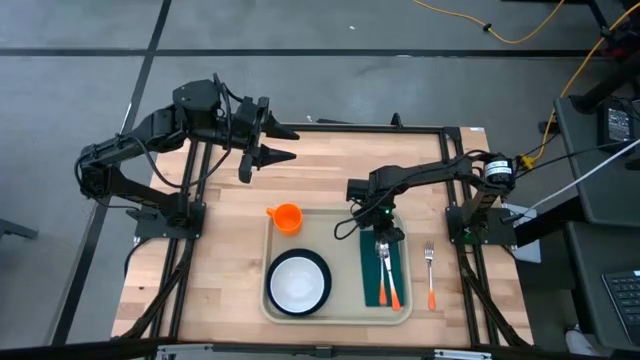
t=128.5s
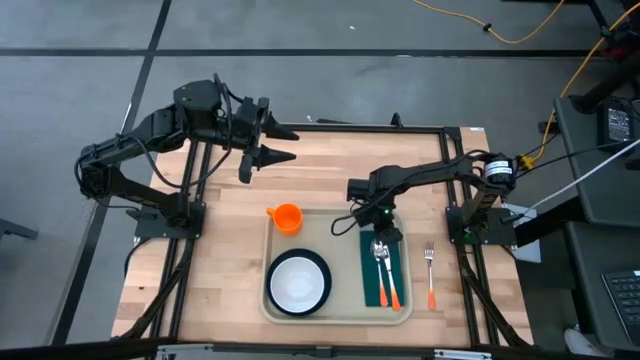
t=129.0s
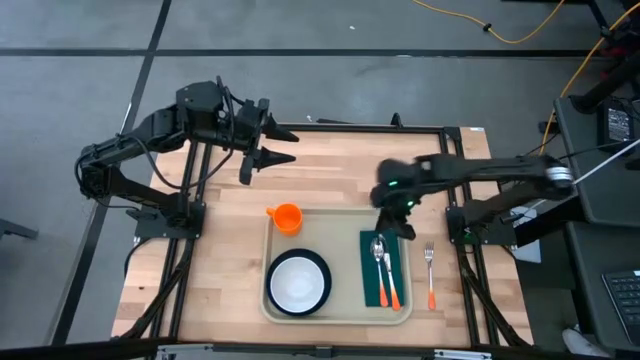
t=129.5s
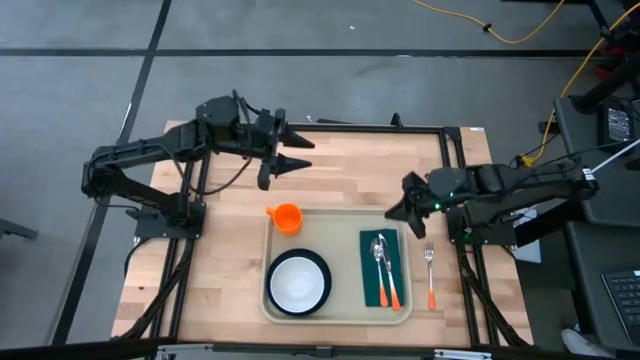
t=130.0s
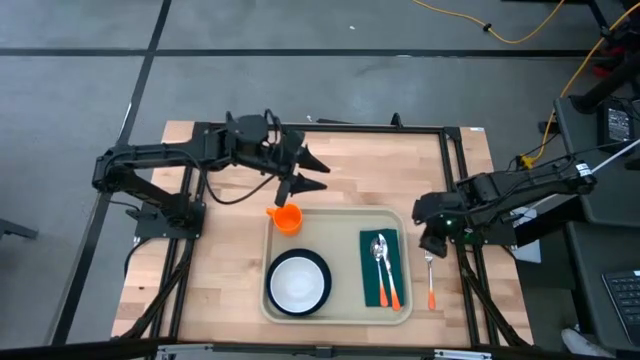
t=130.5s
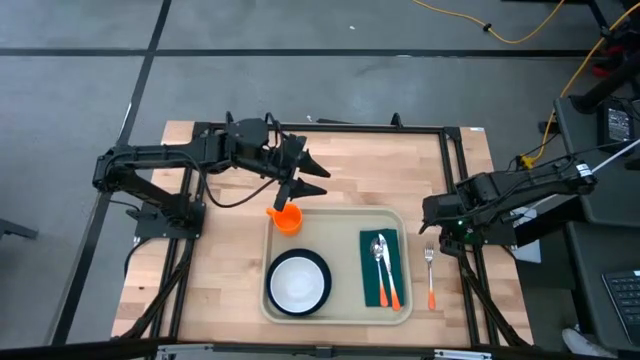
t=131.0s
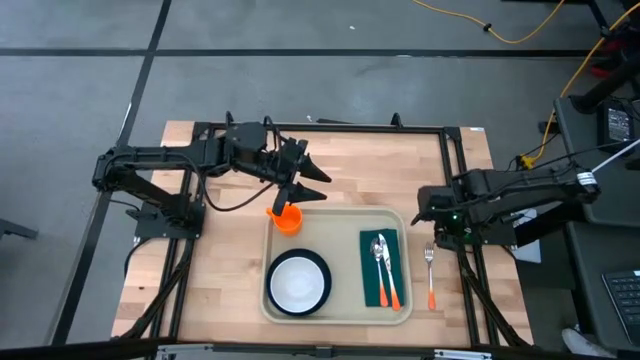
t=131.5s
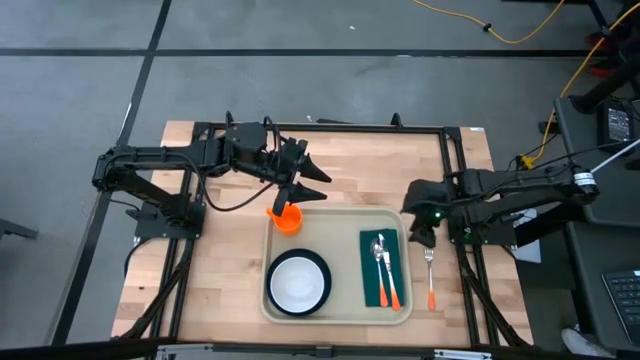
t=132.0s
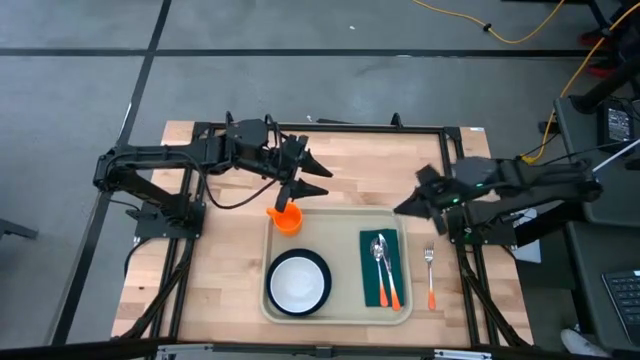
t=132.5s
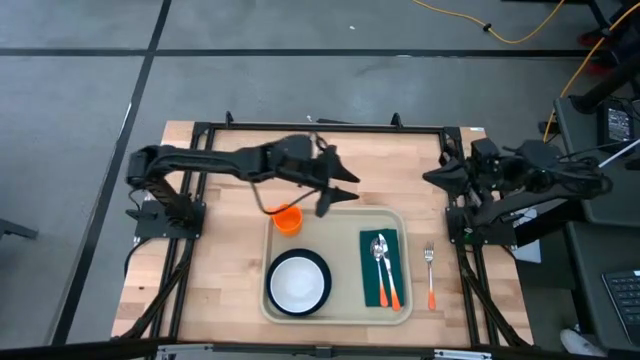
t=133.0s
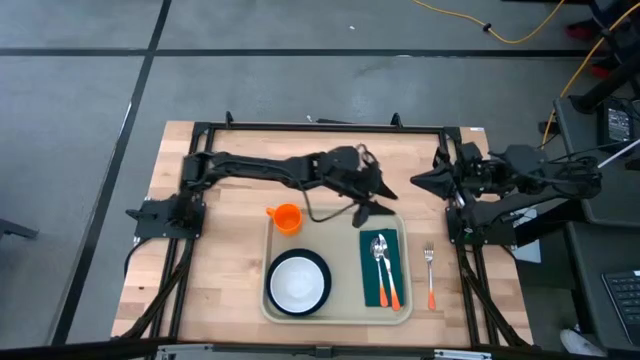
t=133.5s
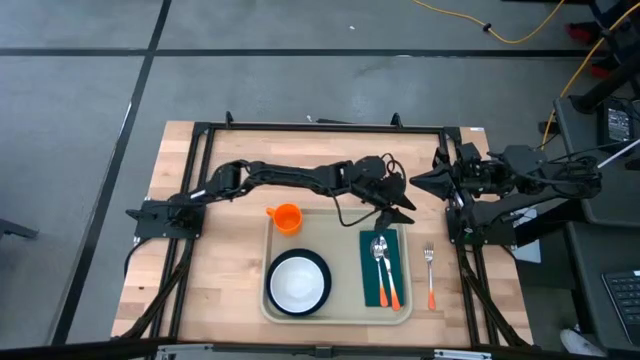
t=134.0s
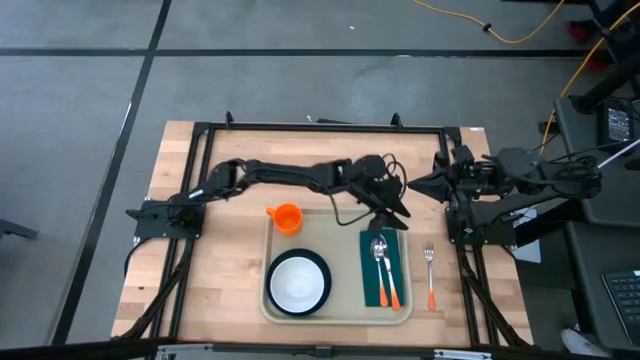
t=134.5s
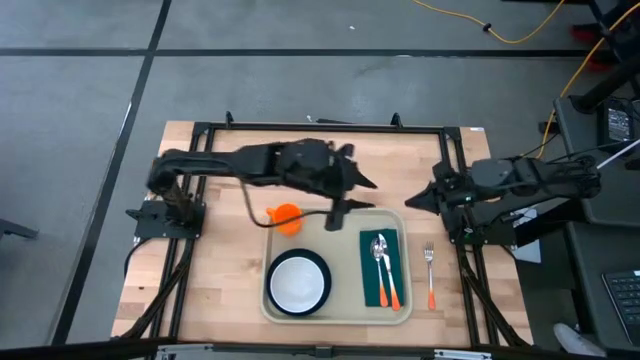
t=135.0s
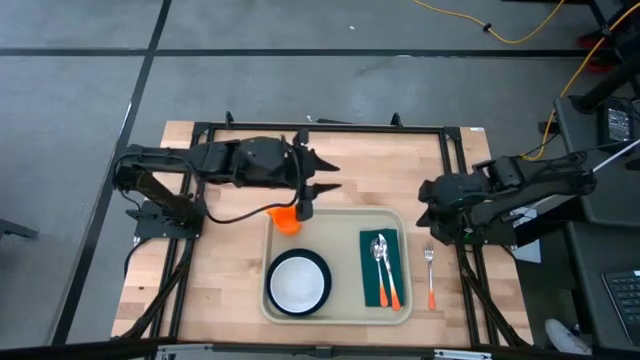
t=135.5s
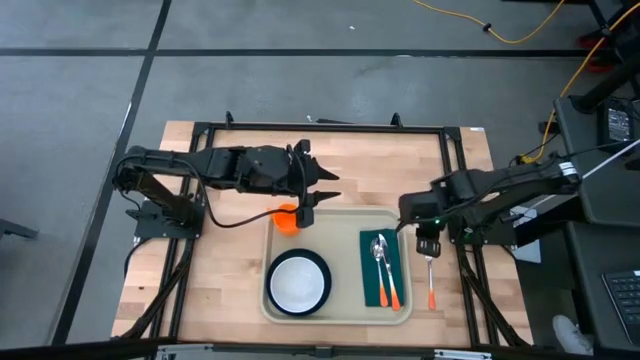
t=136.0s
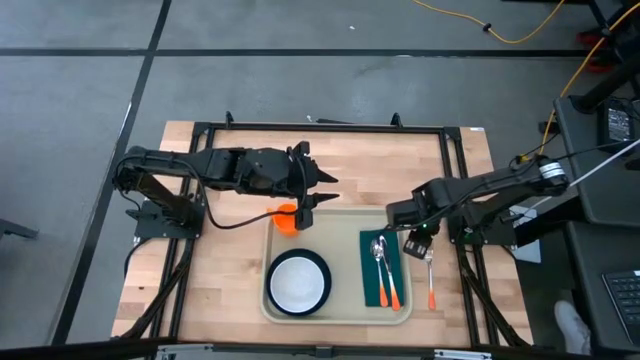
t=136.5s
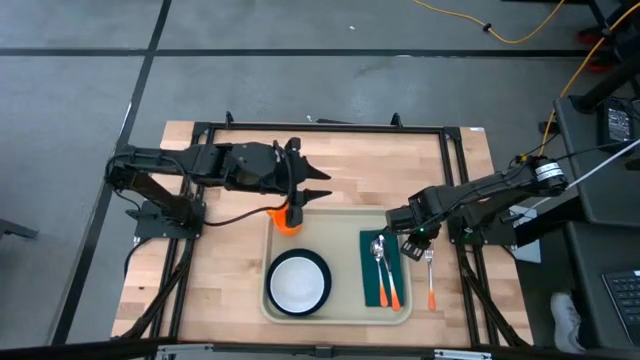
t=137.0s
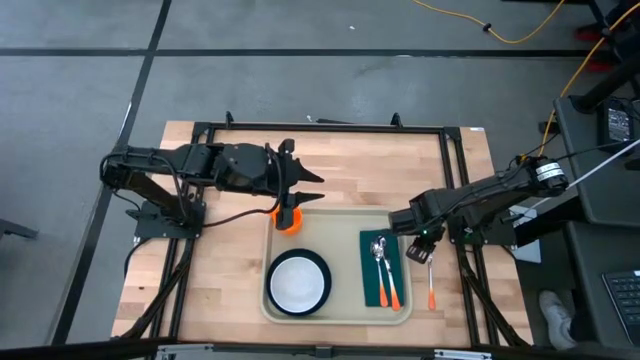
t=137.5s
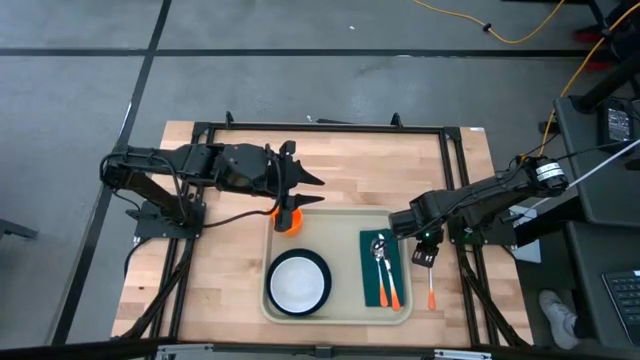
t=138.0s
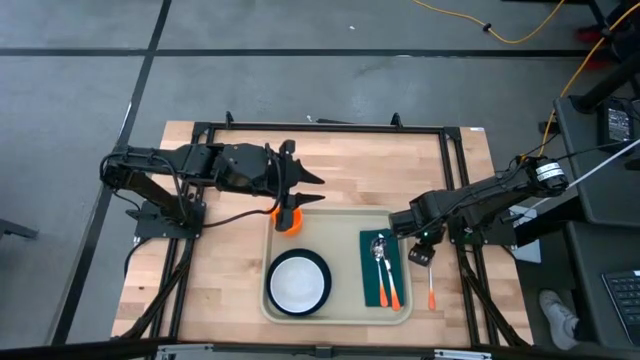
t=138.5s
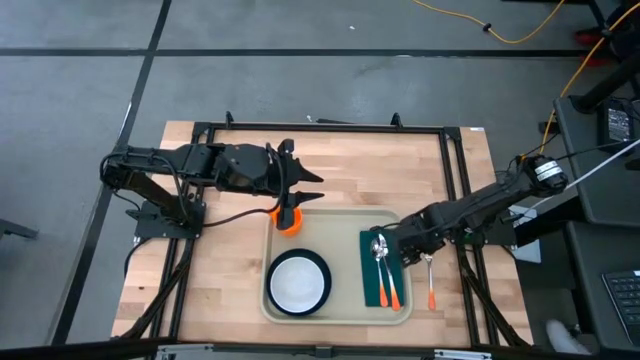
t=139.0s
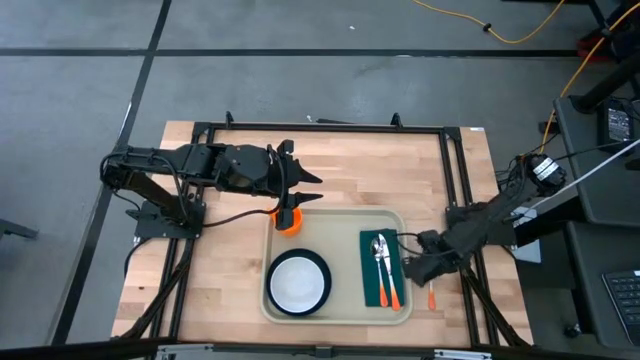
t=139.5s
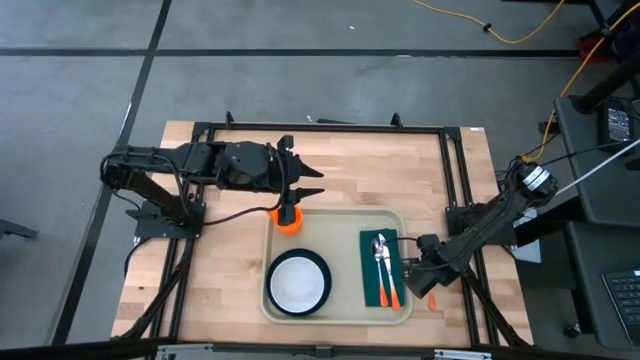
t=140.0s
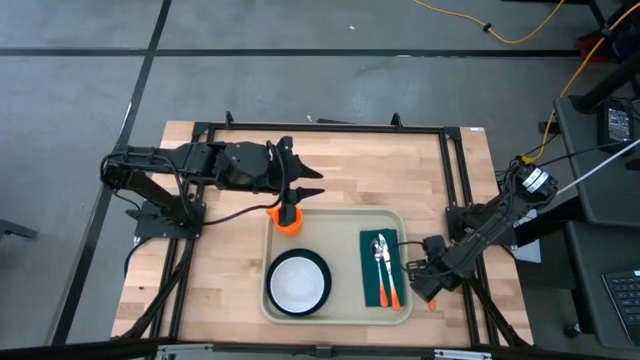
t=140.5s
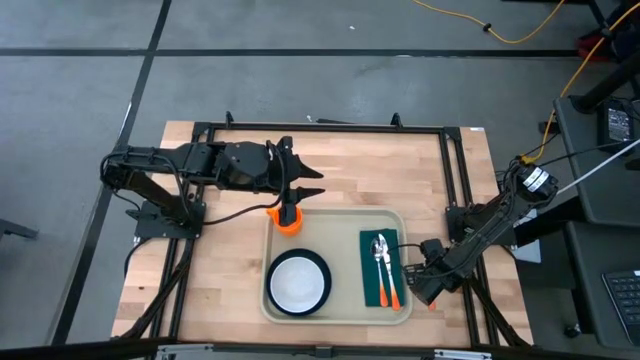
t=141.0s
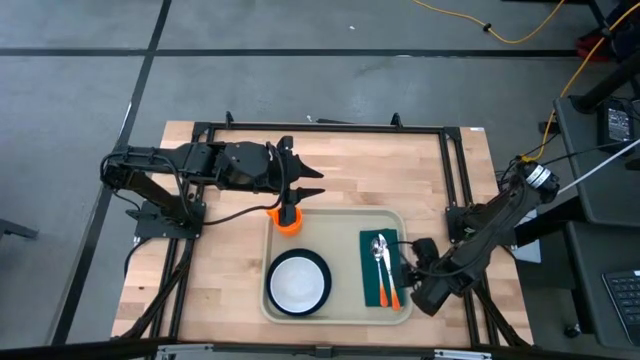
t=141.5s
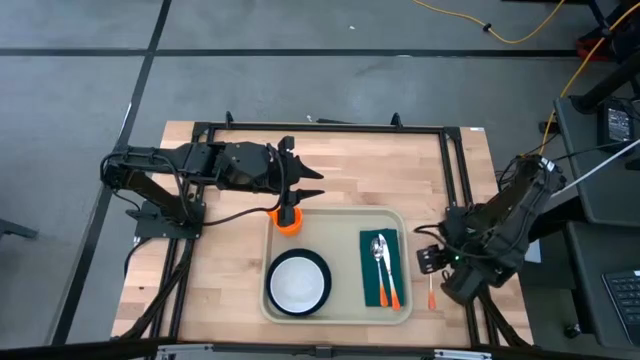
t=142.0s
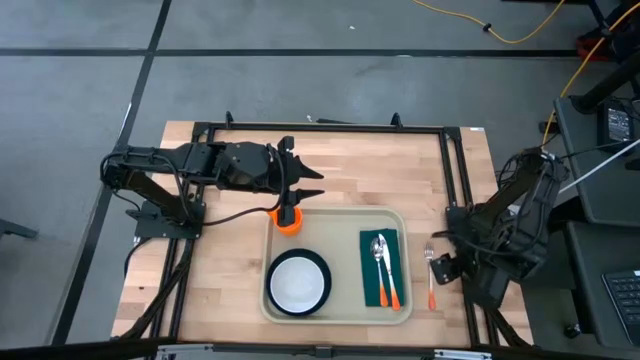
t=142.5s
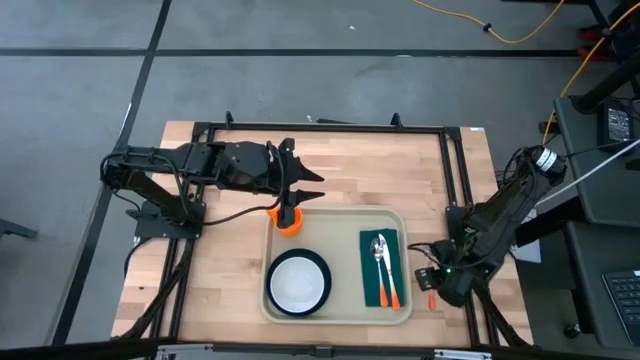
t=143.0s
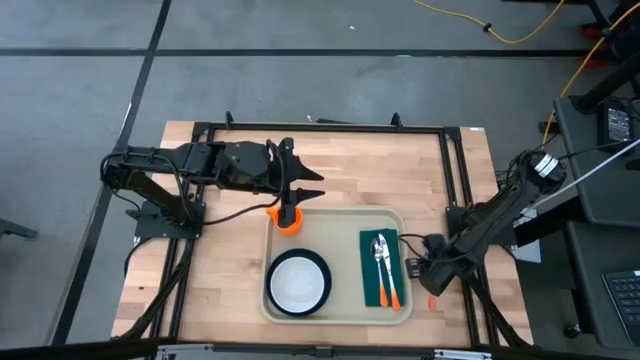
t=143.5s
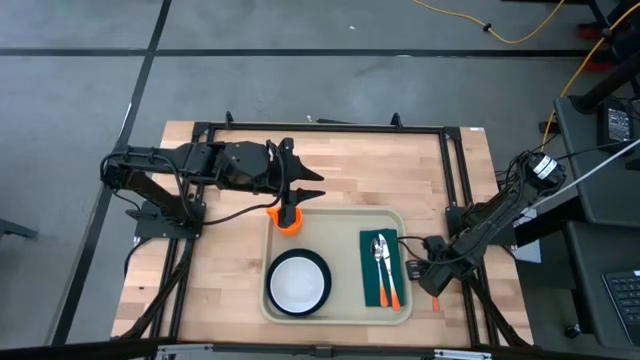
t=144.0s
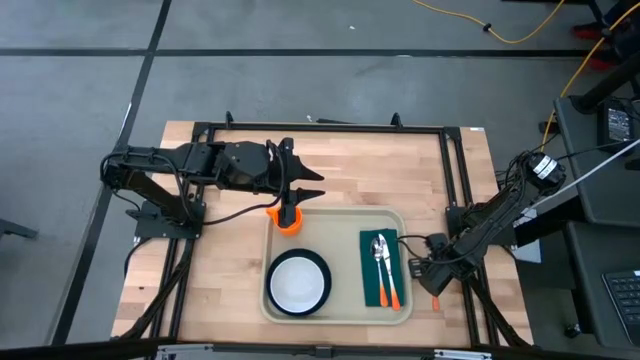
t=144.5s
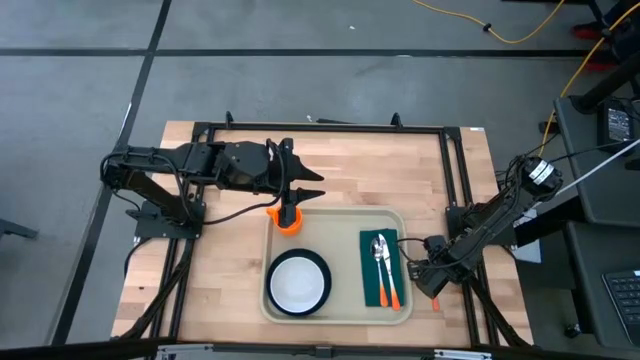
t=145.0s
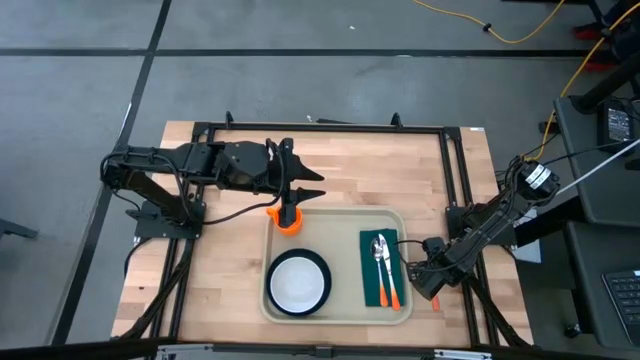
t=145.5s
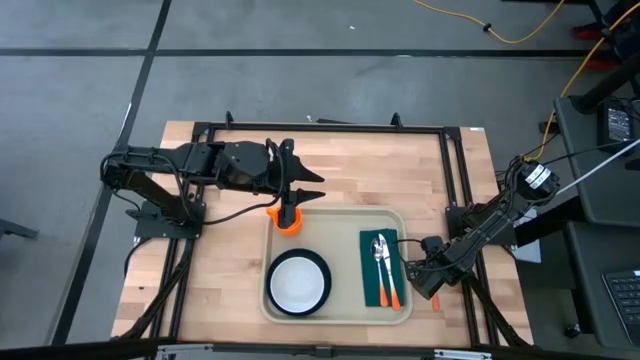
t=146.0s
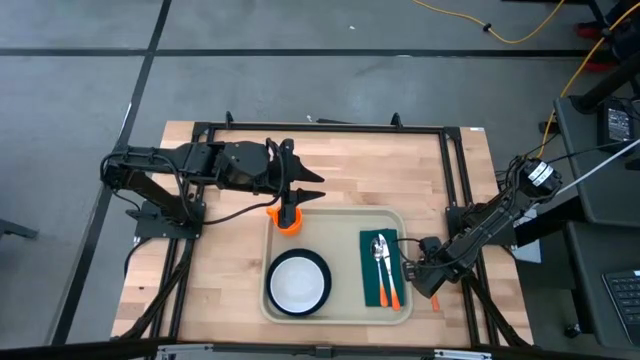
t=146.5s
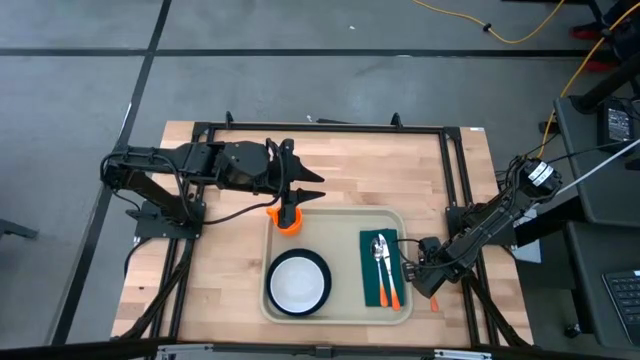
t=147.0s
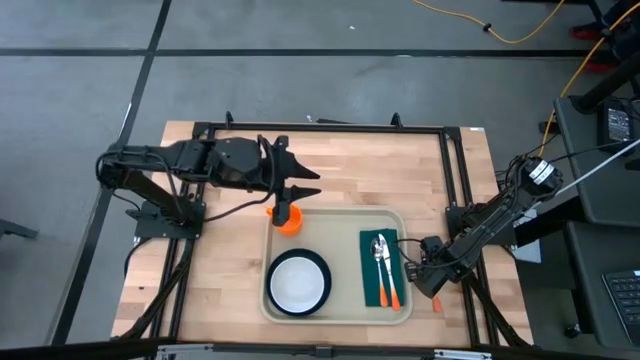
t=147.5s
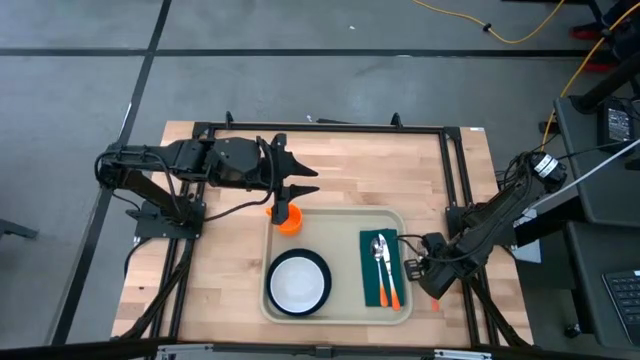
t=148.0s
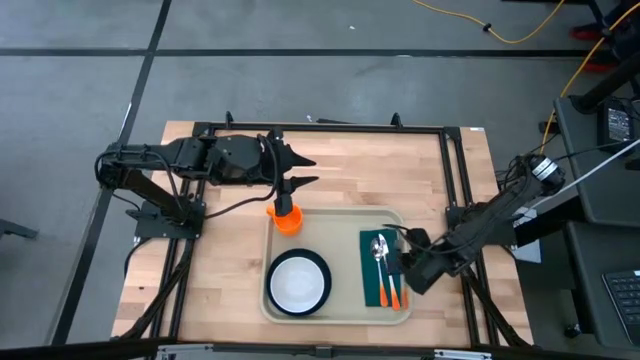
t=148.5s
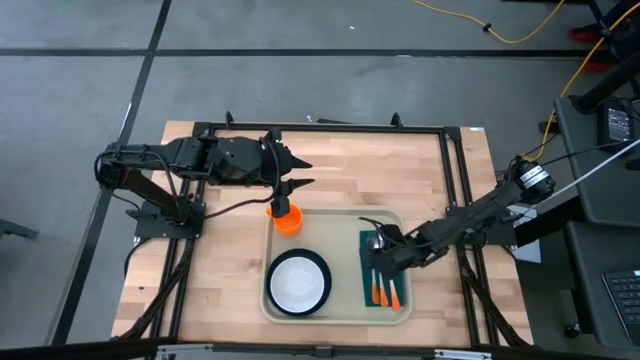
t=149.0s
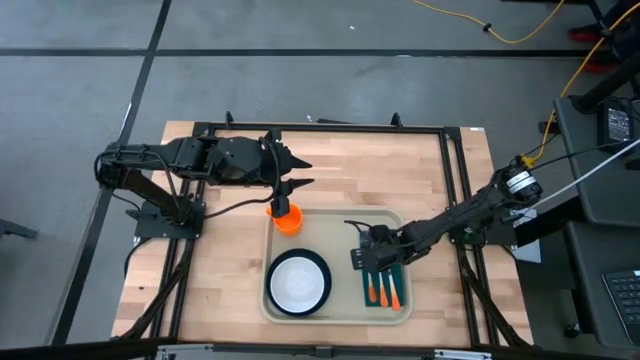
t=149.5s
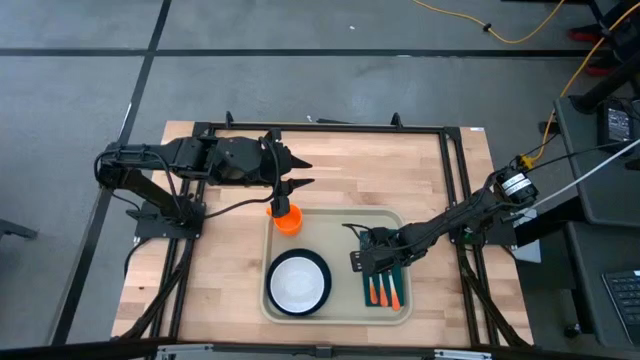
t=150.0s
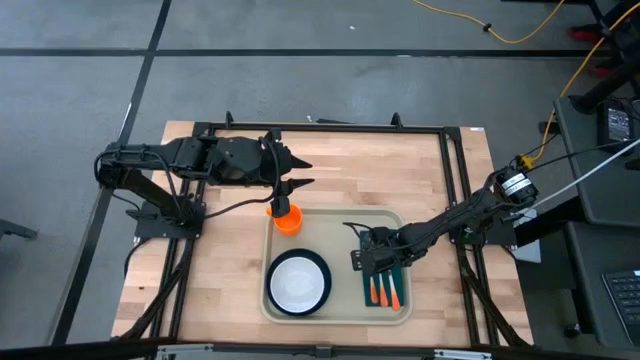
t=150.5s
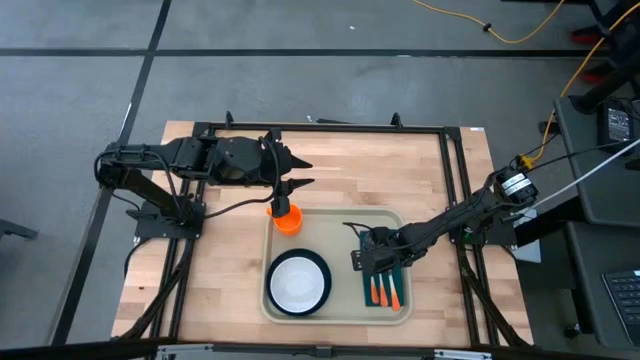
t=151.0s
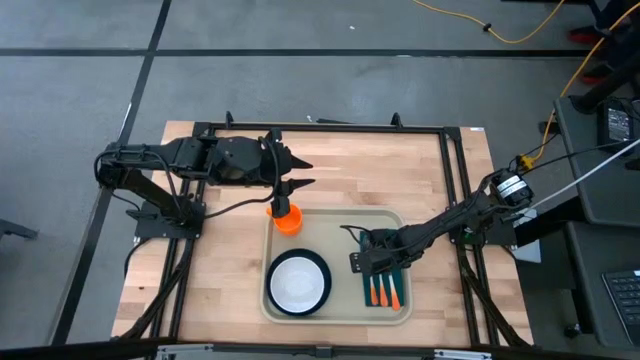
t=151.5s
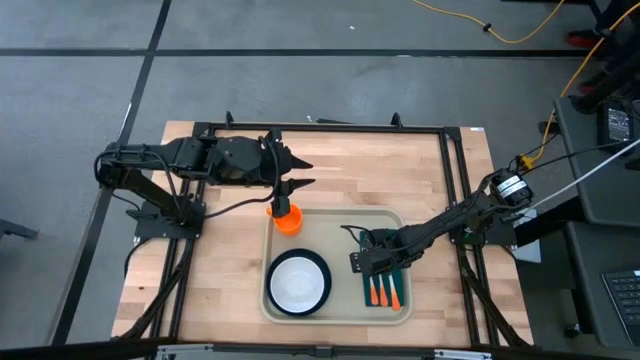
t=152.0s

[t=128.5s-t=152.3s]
Task: Set up tray
Put the orange fork on the green napkin to the left of the orange spoon
